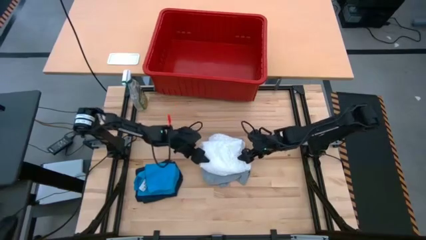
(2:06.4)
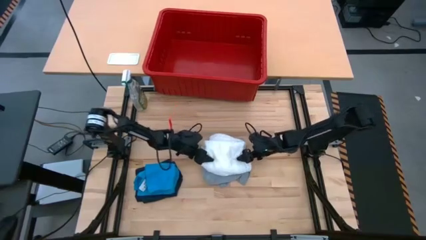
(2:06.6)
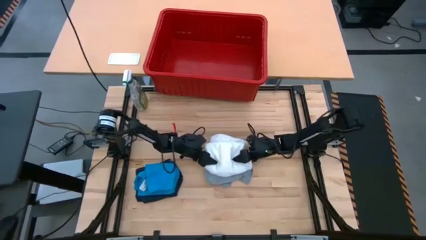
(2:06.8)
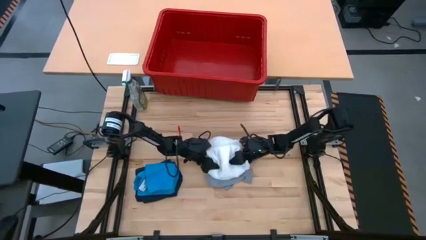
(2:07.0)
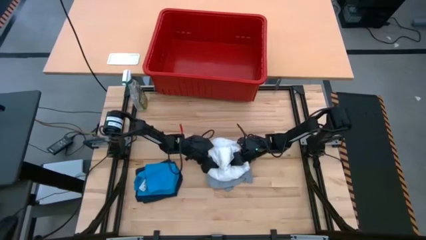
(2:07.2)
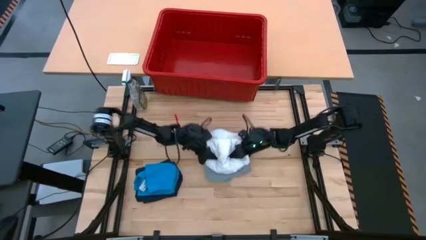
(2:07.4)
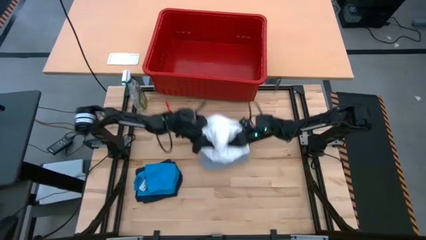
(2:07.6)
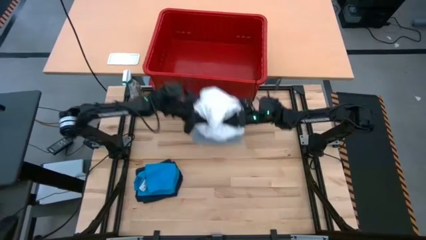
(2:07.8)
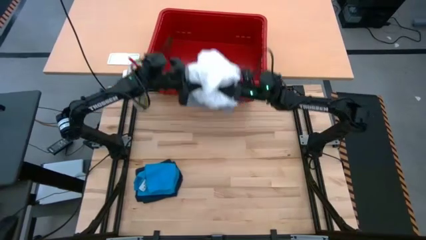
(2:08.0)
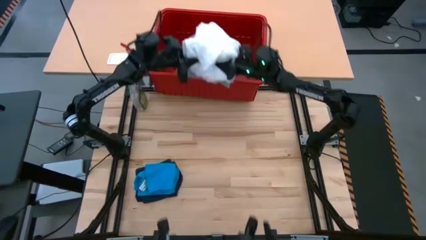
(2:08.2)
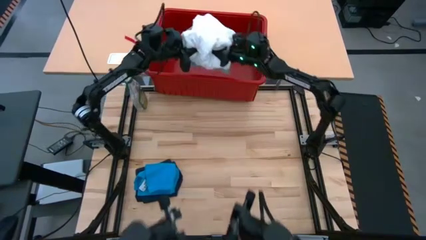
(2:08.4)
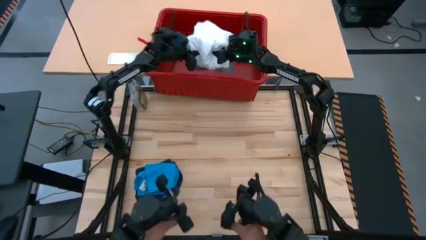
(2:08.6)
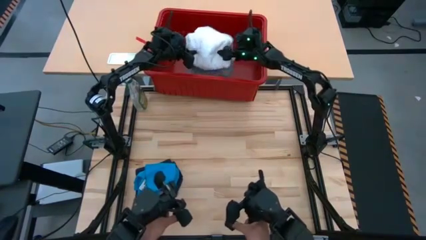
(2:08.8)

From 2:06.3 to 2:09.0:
Task: Fold laundry
Put the gray and white shirts into the red laundry bin

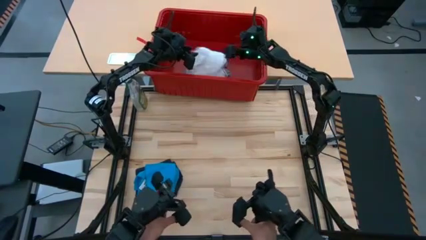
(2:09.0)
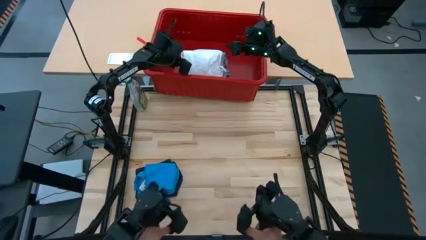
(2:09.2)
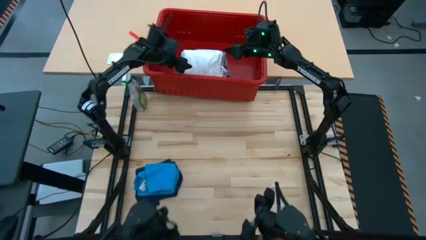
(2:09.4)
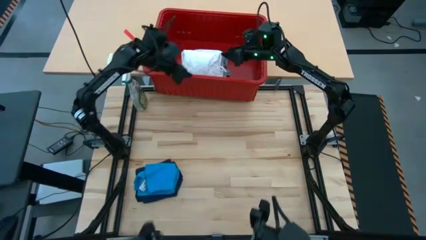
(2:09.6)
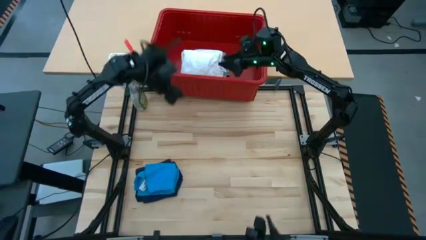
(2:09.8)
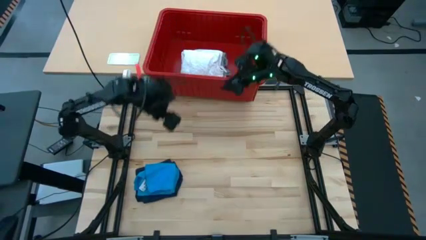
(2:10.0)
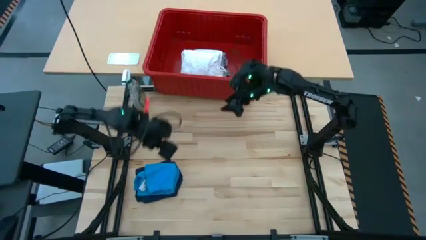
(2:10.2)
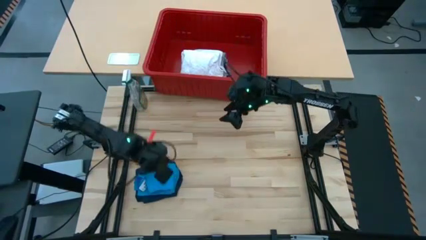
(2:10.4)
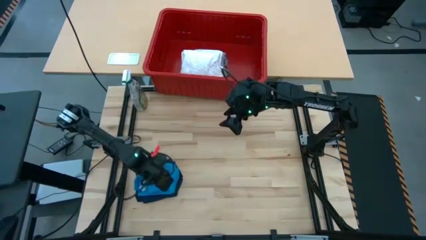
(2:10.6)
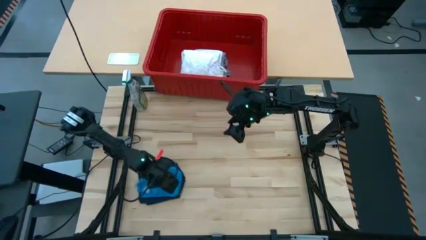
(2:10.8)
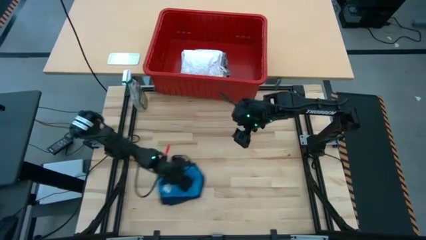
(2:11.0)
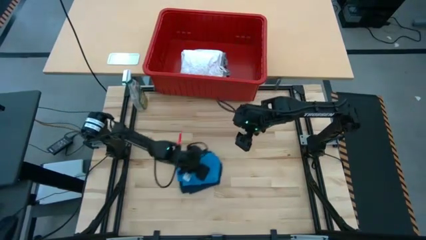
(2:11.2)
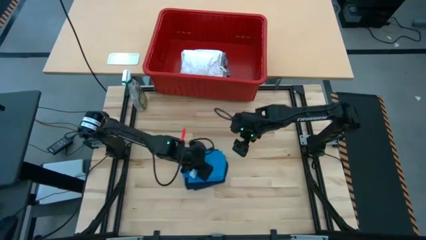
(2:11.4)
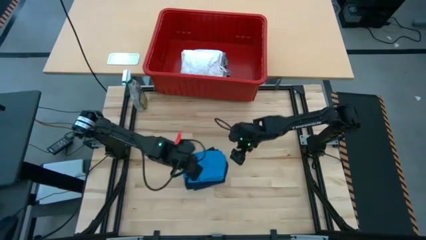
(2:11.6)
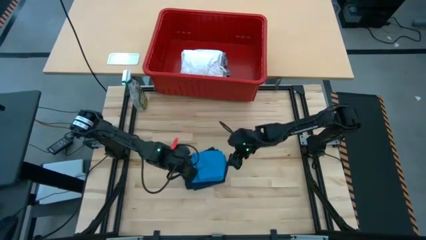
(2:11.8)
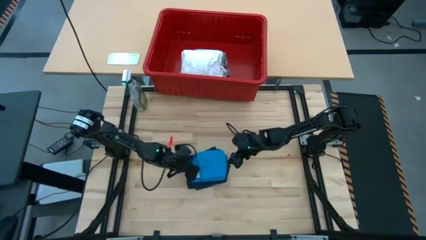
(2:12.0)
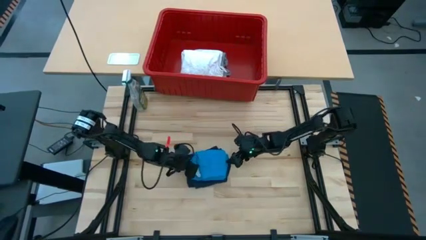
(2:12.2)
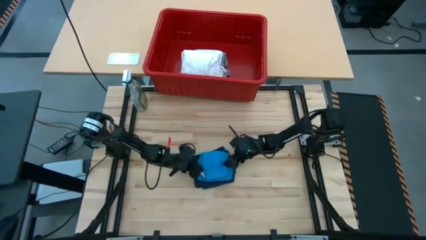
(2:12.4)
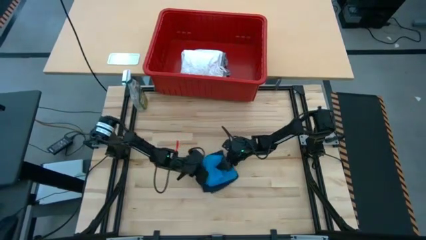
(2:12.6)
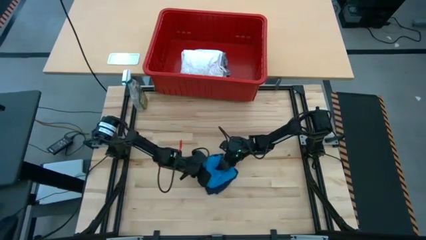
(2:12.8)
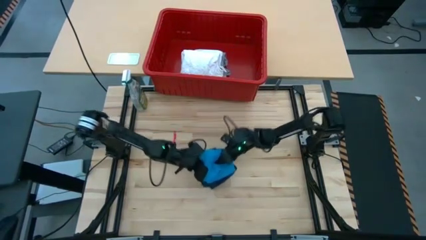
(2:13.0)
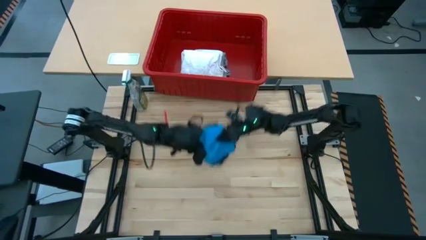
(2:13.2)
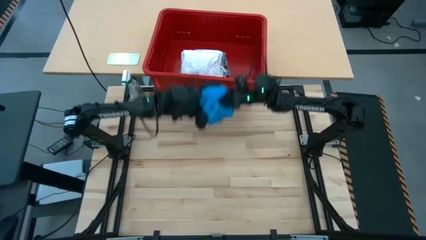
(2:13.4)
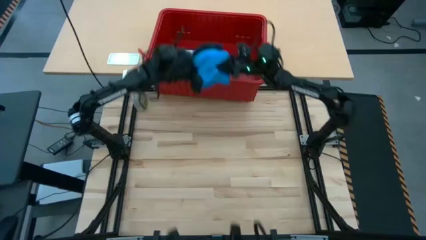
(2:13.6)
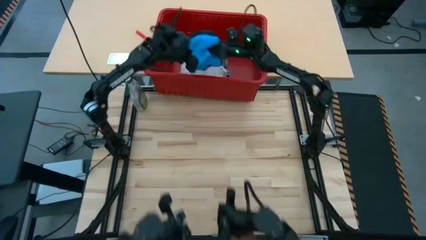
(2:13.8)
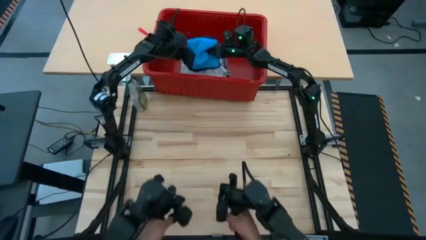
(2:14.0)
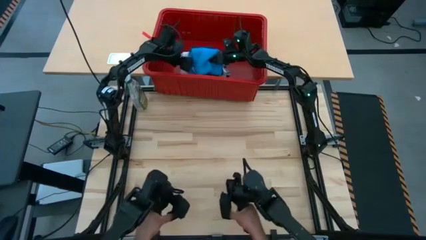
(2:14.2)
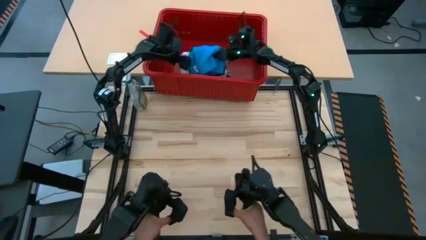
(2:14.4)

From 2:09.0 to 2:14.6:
Put the dark and light blue shorts into the red laundry bin

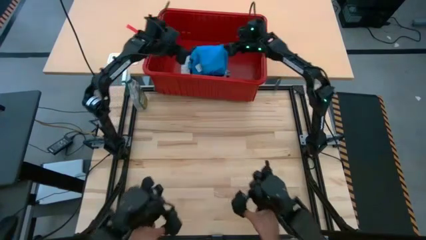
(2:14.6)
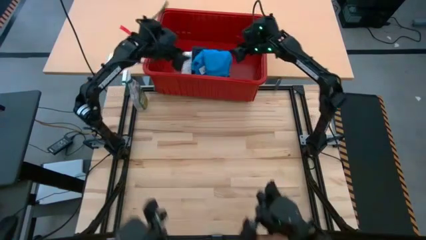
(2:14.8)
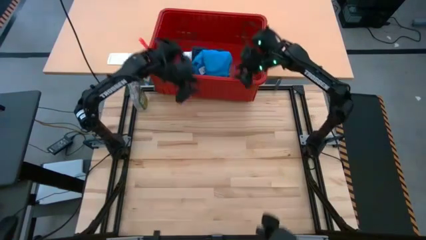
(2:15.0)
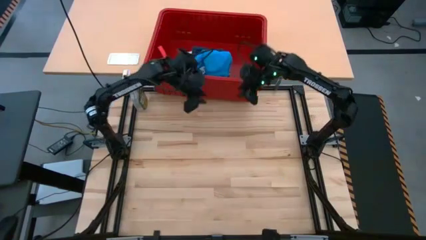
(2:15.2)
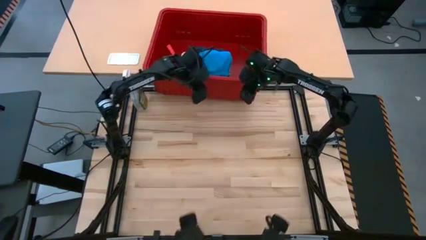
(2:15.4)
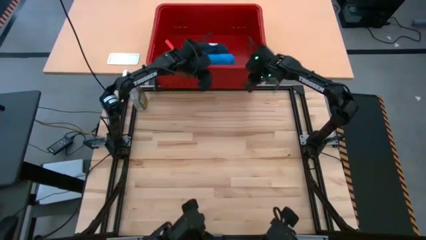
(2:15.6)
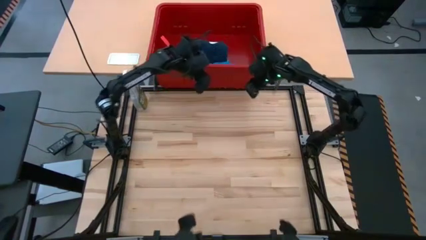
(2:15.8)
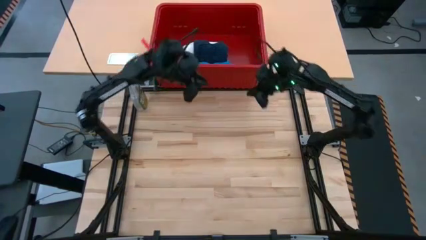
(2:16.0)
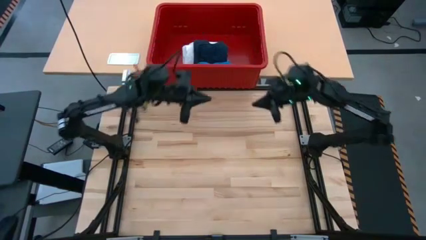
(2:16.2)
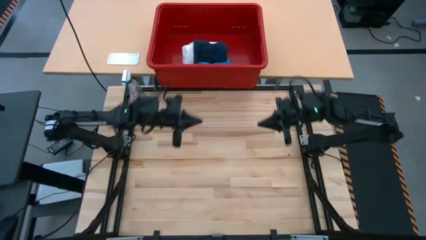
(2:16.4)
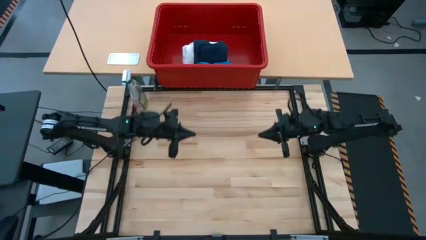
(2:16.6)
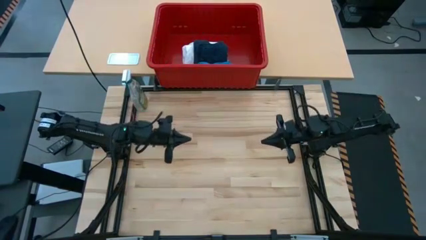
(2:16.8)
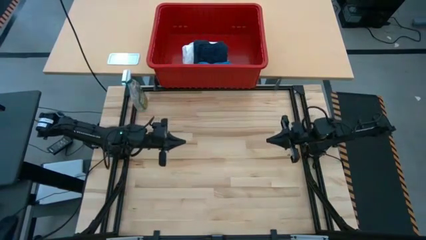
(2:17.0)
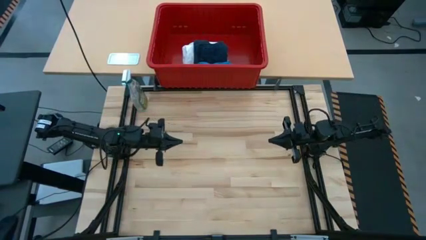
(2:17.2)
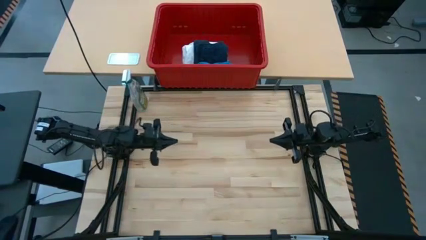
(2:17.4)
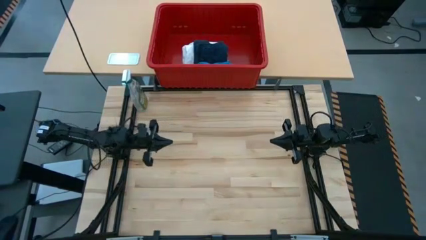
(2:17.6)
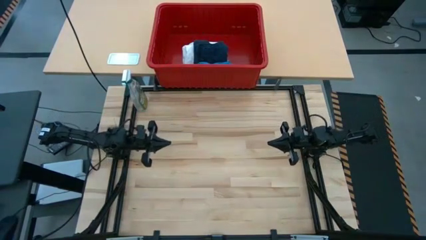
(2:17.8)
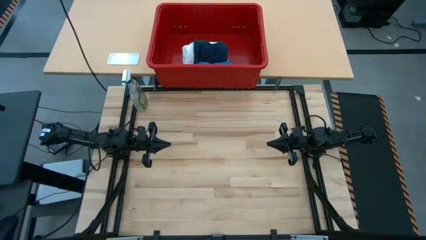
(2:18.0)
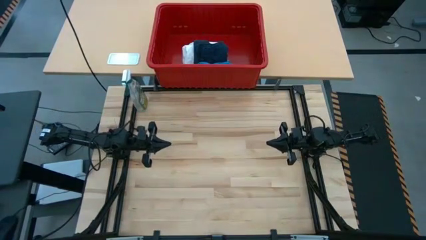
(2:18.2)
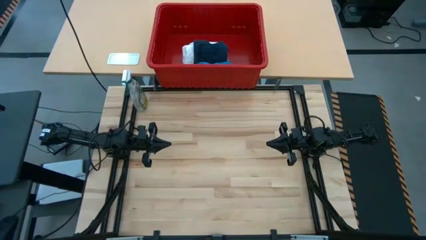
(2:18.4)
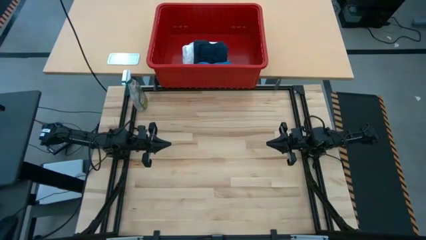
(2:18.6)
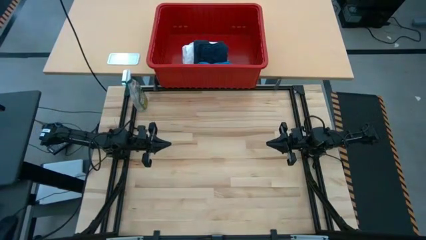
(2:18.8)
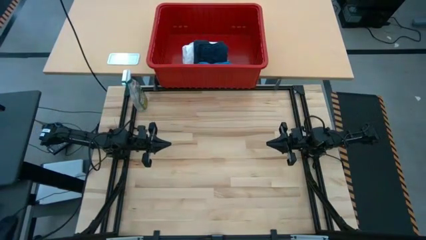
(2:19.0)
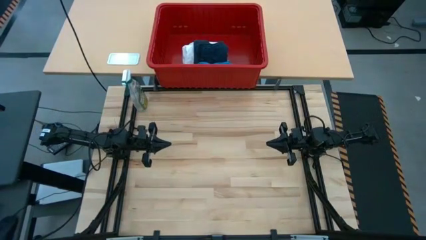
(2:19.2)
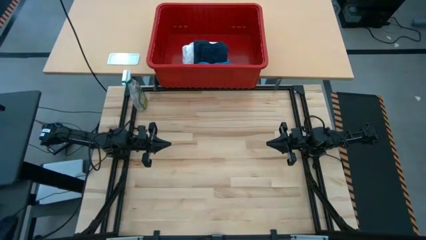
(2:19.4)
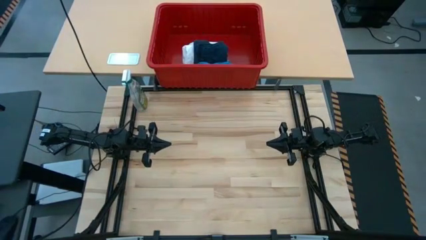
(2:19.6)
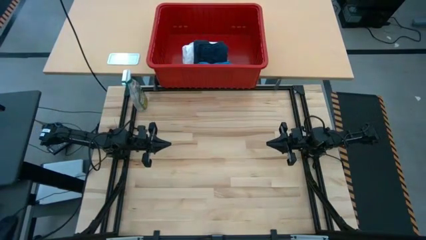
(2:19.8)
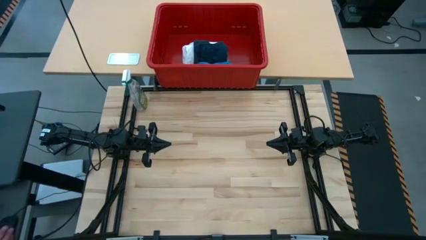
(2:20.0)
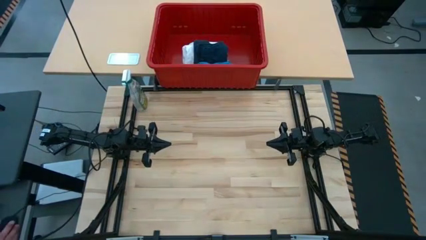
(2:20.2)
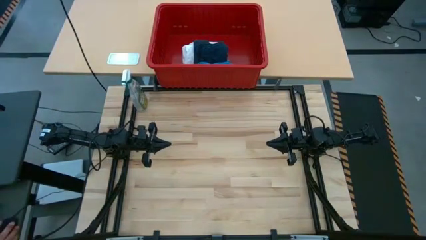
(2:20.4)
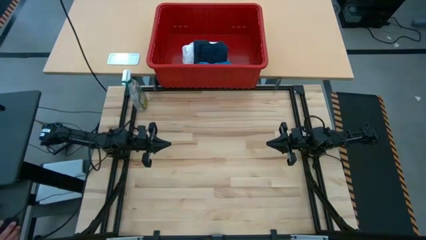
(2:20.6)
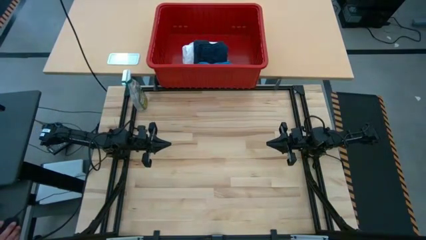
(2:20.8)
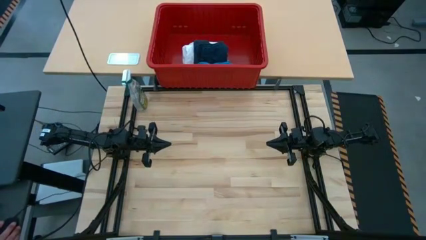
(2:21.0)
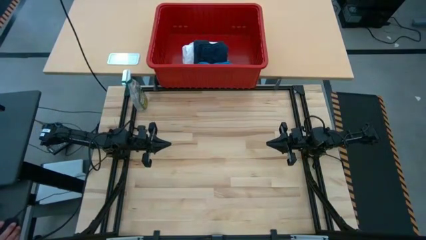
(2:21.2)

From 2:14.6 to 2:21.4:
Return to Home Position

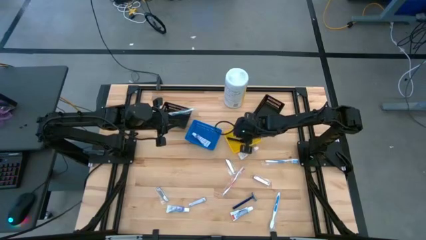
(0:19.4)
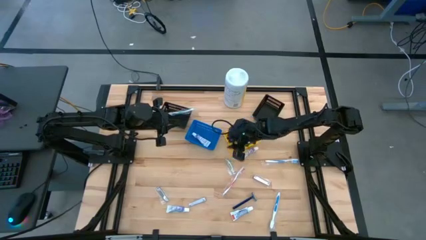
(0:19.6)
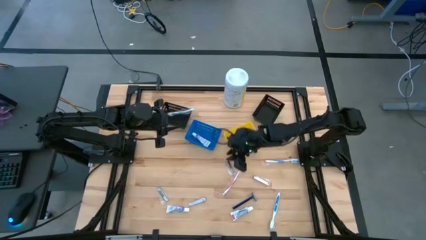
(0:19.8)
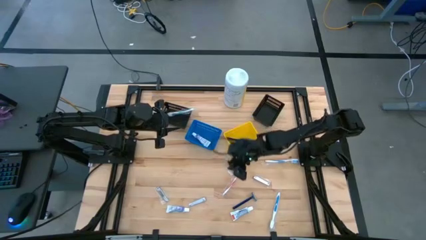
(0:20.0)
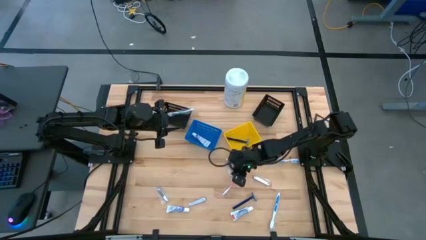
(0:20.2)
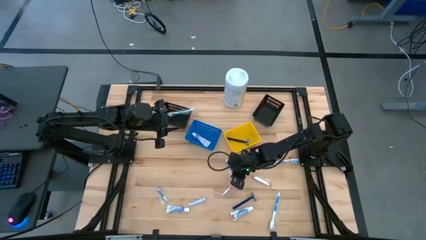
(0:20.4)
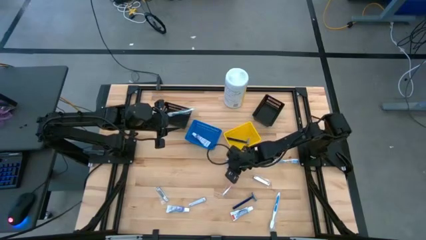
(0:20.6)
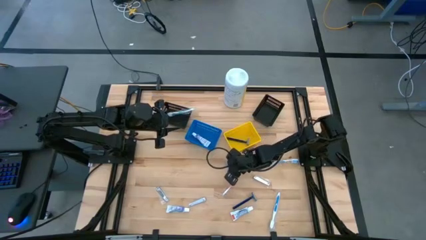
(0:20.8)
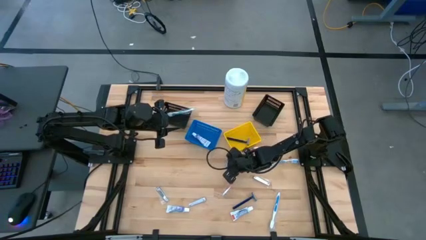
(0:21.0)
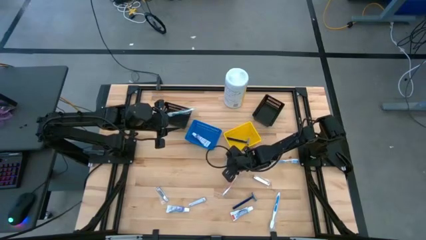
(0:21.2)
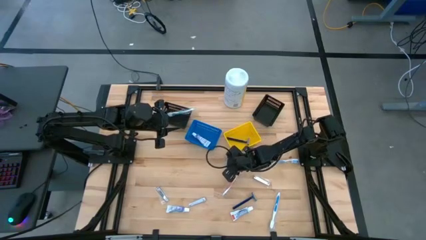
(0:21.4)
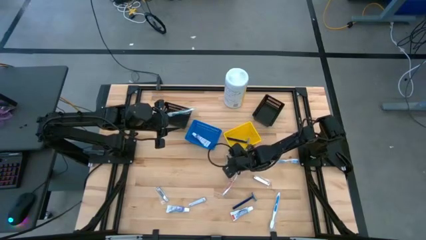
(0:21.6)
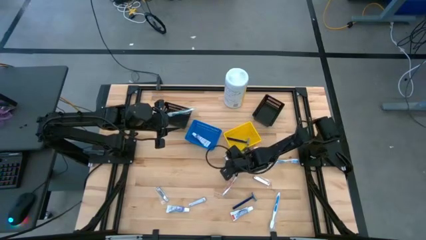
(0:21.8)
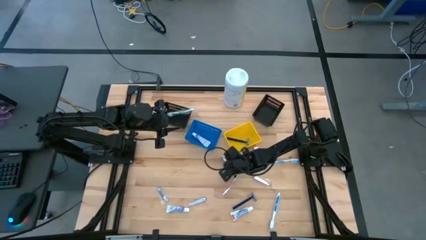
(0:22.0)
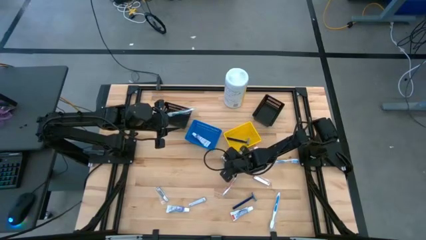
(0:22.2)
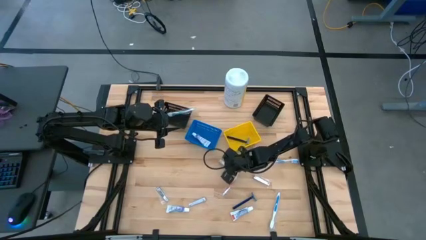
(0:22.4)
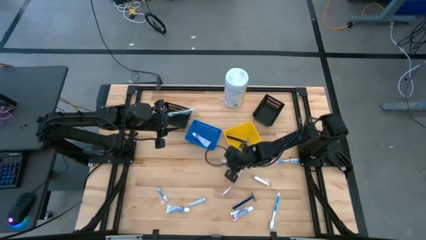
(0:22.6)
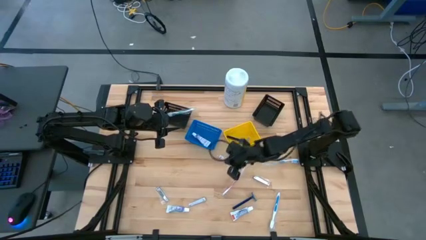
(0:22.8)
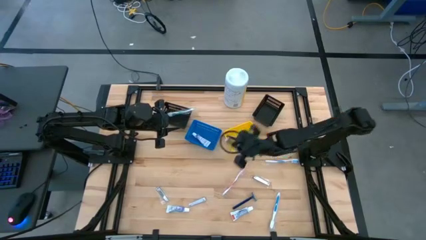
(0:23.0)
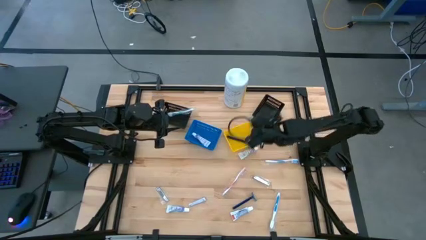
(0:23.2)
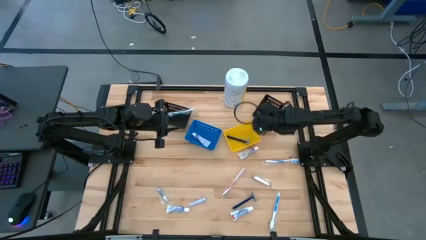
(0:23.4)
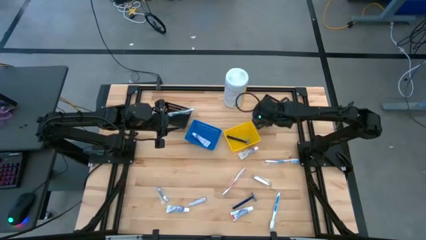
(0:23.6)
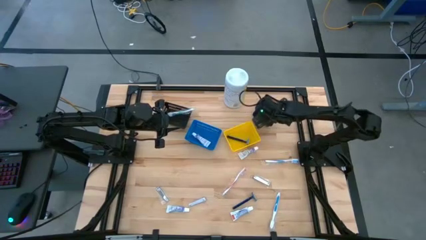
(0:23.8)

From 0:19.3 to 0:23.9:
Task: Pick & Place Travel size toiletries
Put the silver nail cutter into the right black bin
